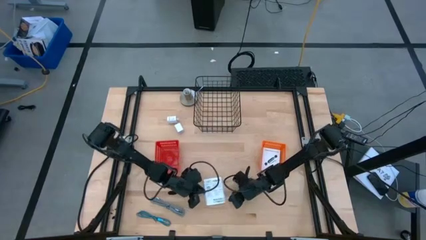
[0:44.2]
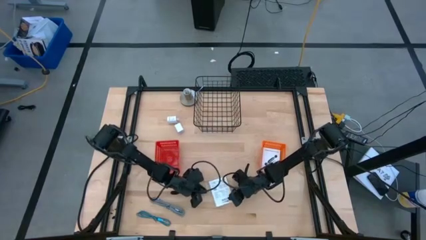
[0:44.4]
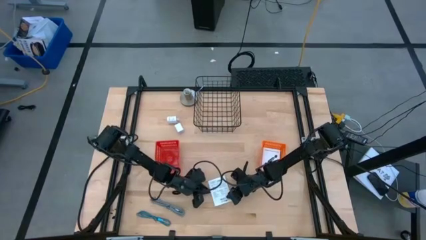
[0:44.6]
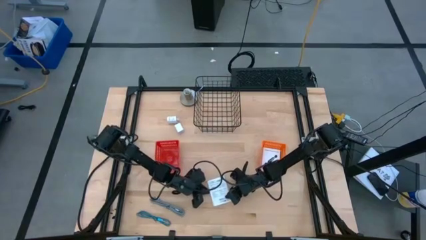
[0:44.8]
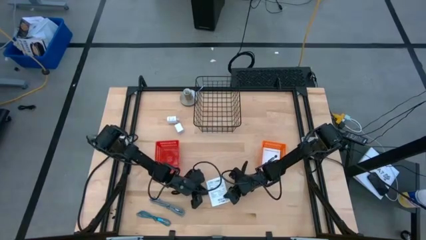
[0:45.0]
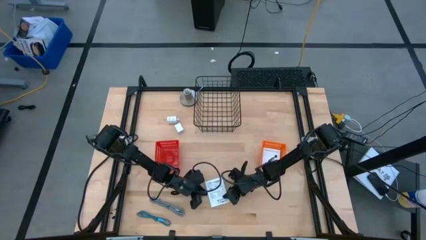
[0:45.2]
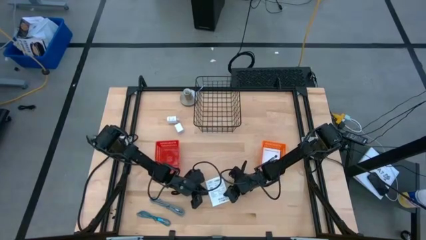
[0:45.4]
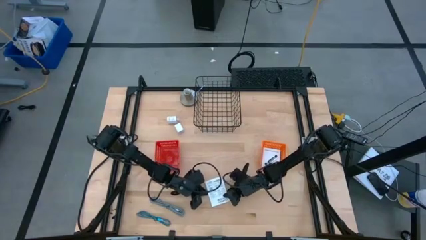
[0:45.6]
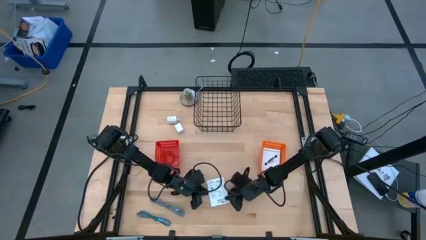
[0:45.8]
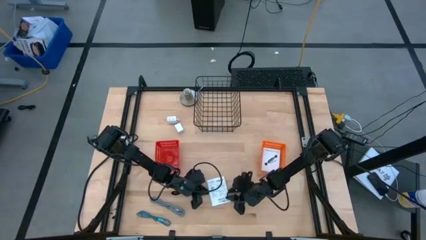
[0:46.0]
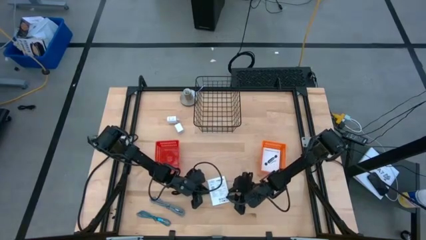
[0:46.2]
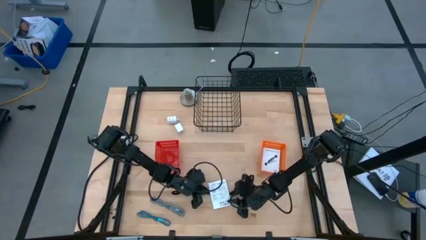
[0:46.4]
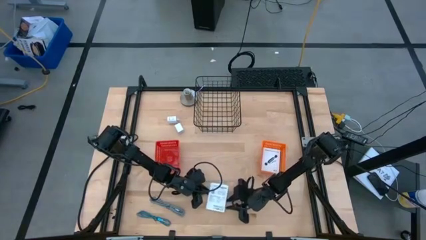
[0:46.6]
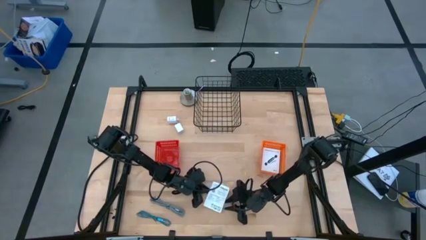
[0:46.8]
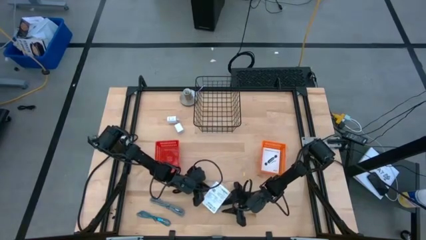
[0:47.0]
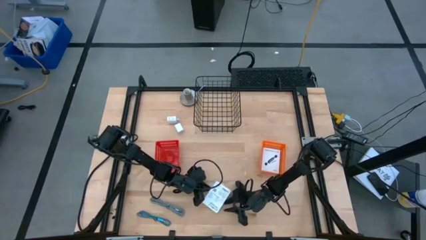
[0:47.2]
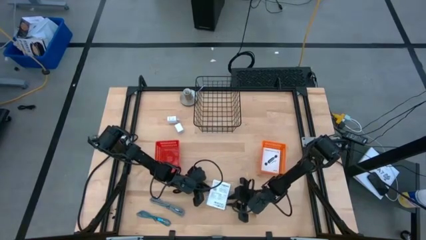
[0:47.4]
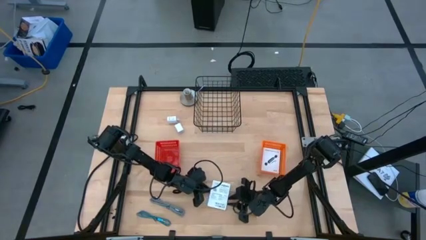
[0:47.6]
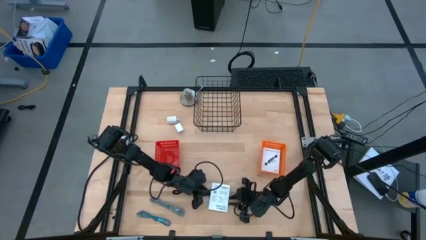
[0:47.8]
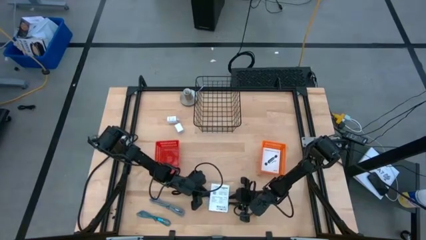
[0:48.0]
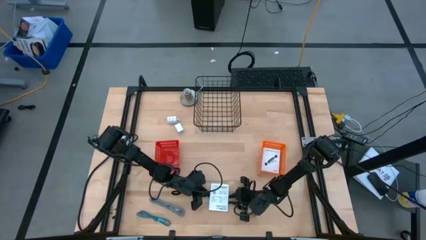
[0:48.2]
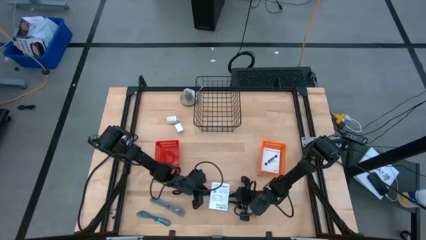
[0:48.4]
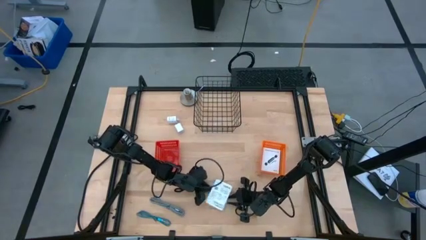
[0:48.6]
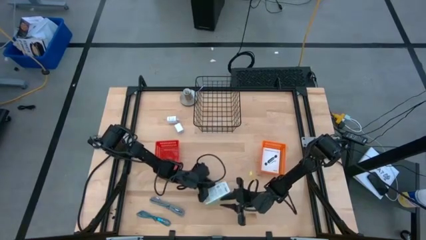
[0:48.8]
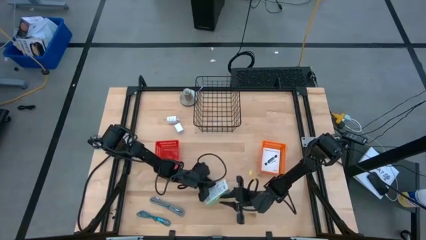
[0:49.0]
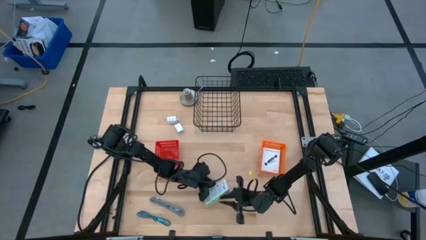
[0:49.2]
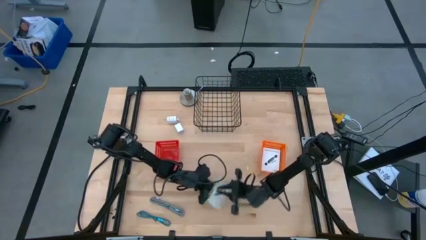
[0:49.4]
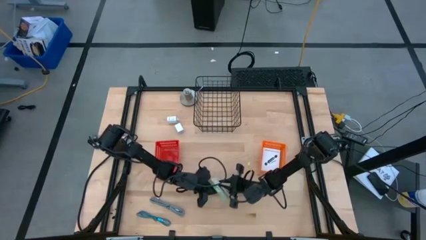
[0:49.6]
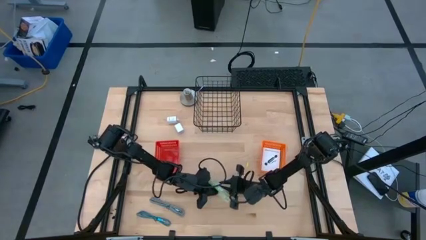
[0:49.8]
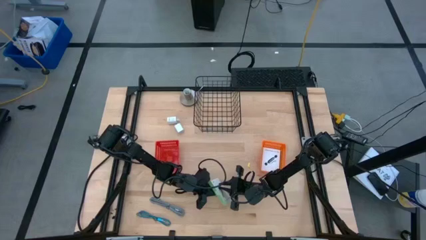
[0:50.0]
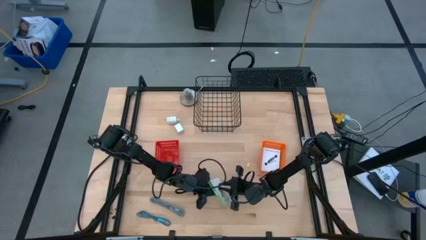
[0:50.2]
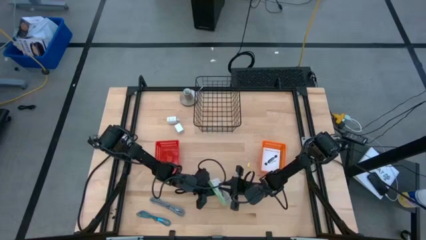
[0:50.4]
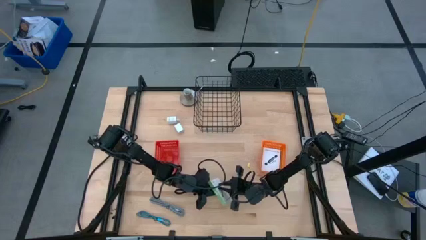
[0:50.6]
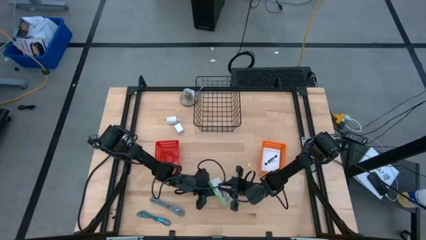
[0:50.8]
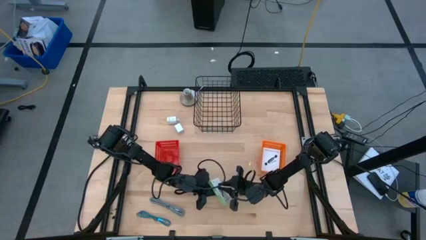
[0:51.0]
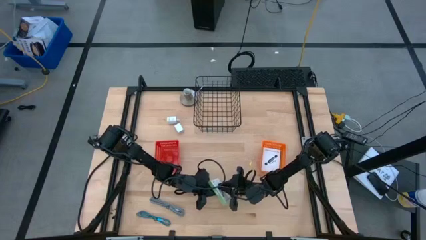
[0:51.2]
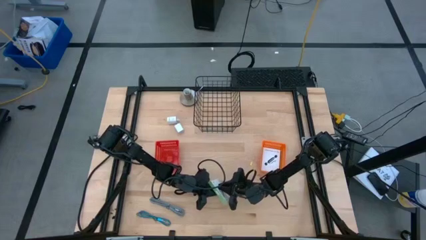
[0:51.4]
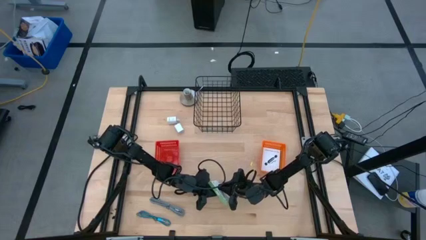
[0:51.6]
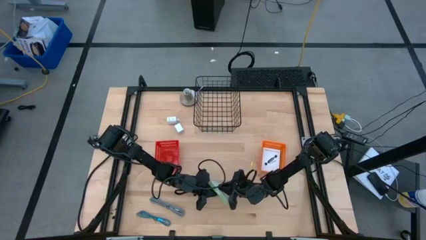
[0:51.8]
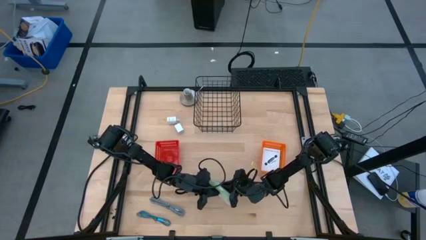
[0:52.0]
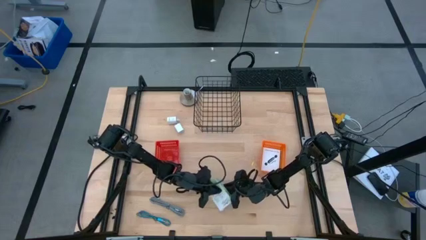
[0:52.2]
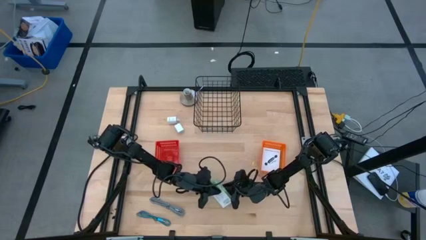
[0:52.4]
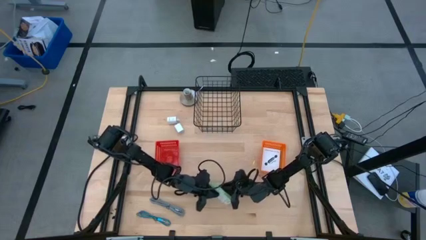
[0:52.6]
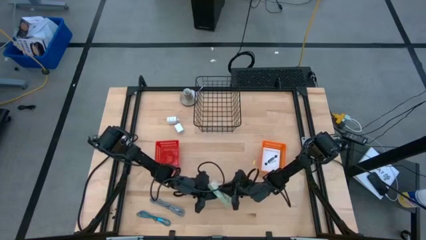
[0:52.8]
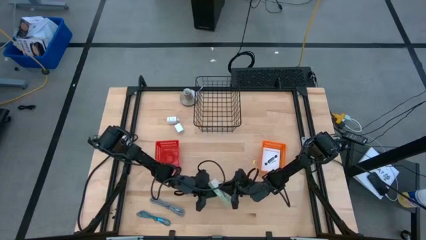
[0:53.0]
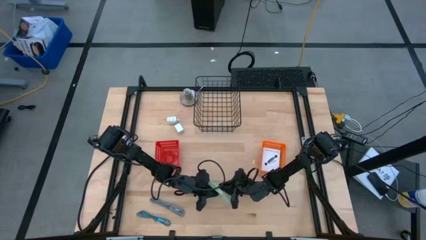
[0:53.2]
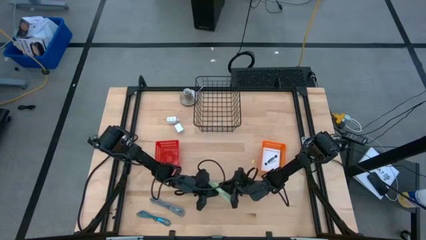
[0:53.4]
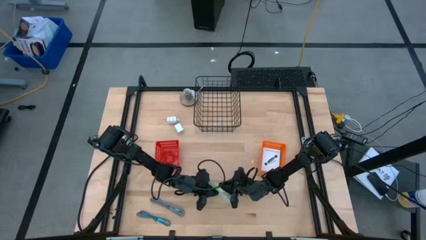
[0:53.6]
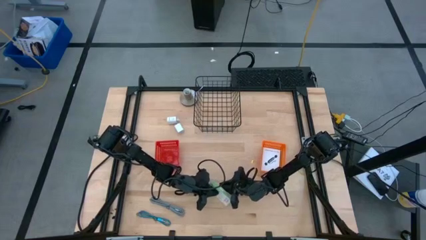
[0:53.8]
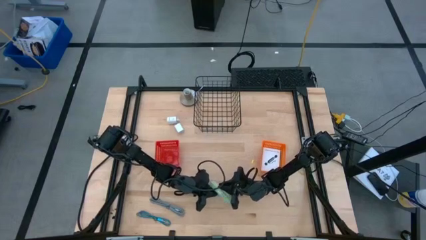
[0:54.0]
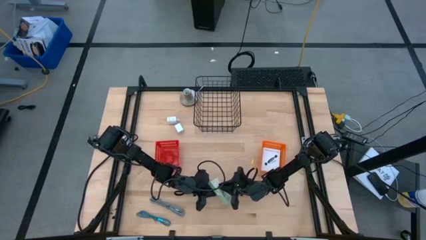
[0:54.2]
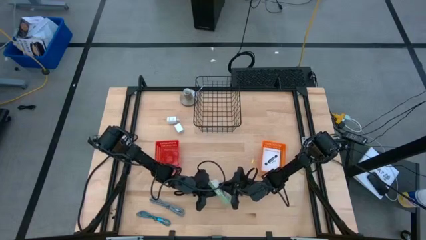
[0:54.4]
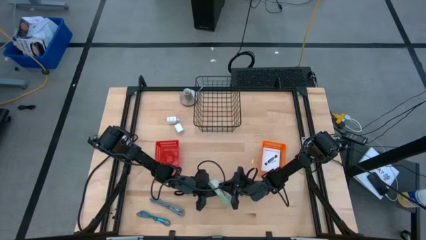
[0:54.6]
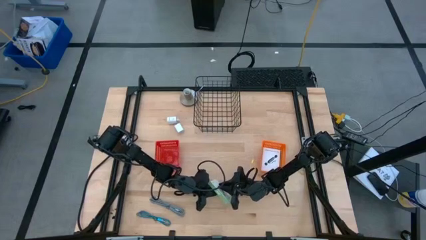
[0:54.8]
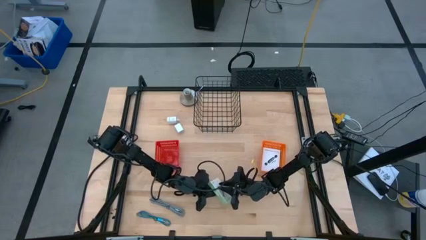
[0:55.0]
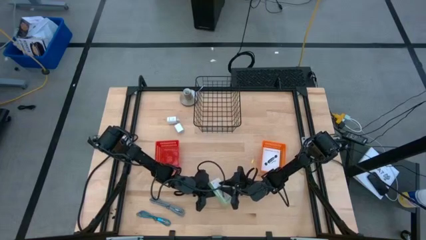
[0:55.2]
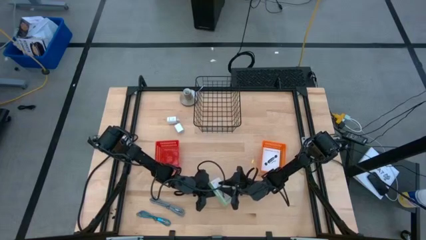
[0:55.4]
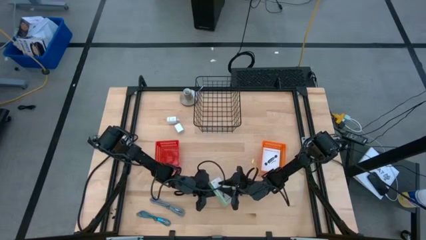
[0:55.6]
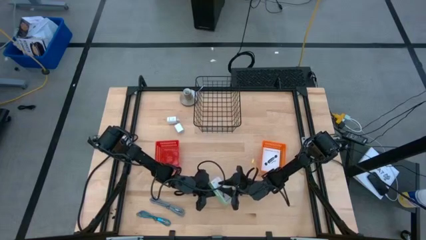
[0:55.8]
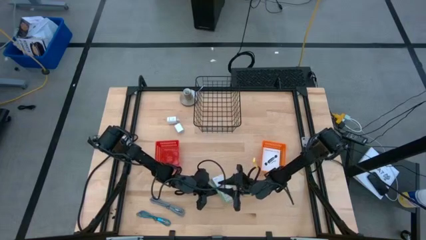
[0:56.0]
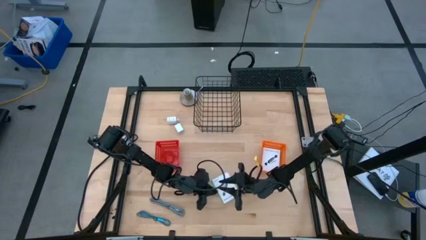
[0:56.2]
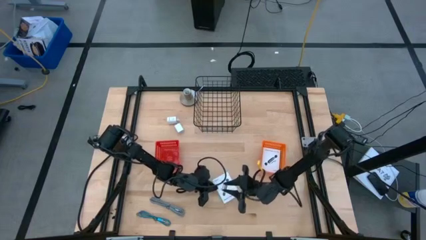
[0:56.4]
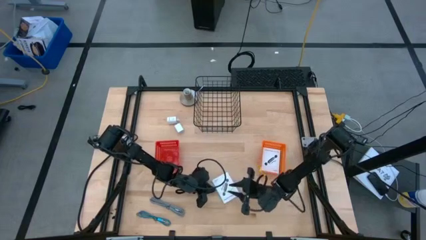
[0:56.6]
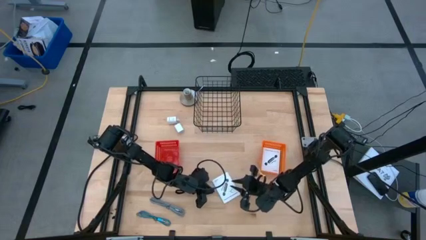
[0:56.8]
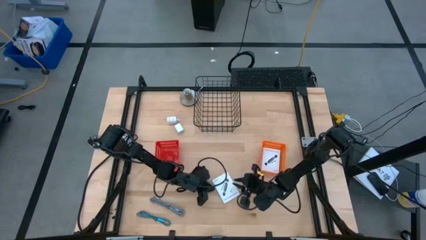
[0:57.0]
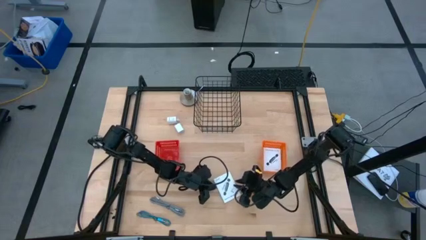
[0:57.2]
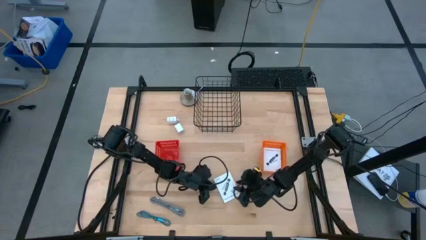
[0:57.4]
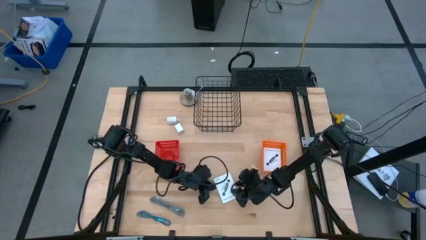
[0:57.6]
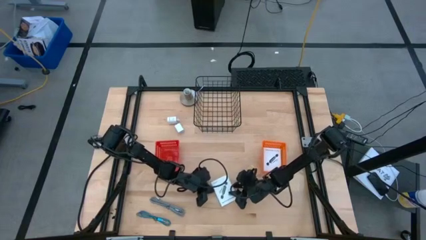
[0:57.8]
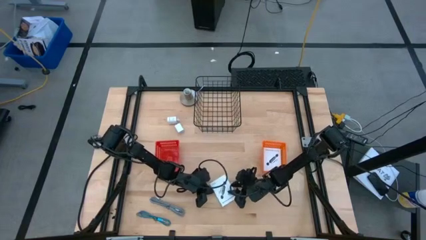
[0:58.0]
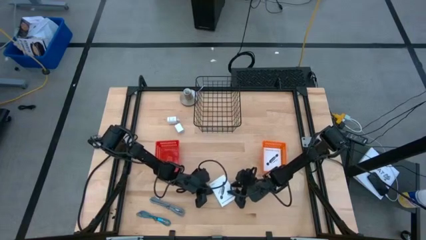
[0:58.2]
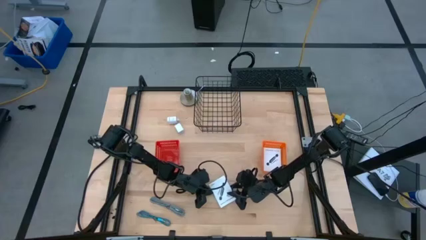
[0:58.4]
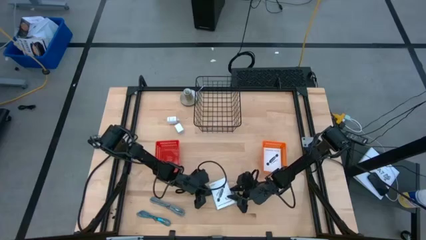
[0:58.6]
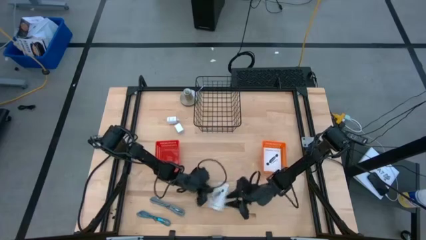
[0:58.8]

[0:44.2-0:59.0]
Task: Pick and place items into bin
Put the card reader box into the orange bin

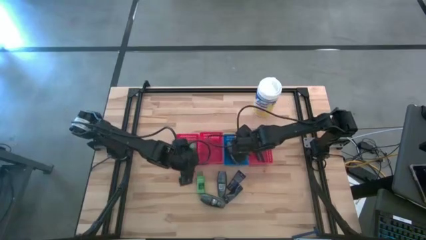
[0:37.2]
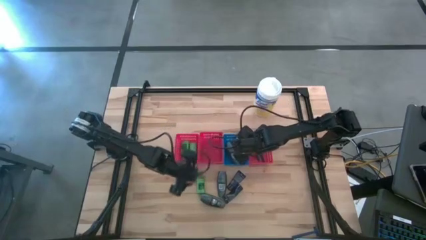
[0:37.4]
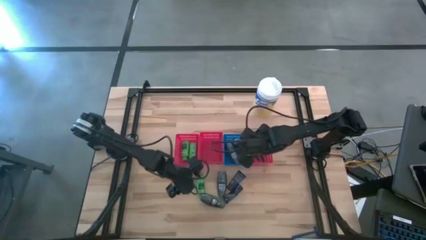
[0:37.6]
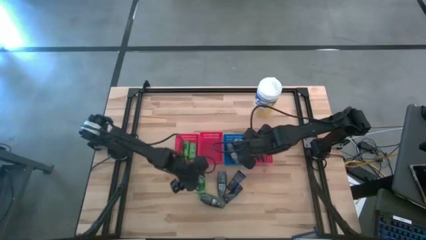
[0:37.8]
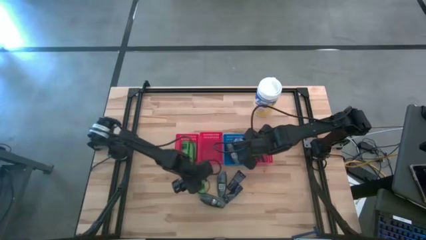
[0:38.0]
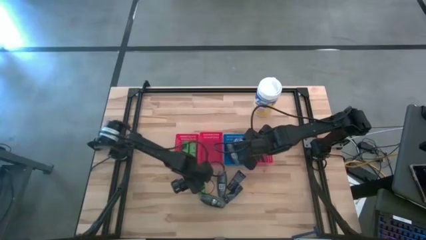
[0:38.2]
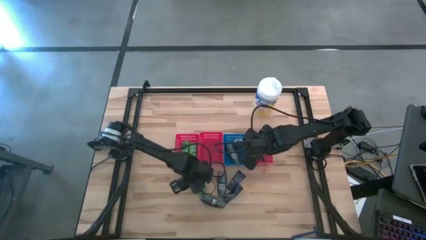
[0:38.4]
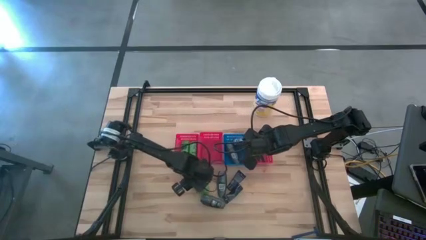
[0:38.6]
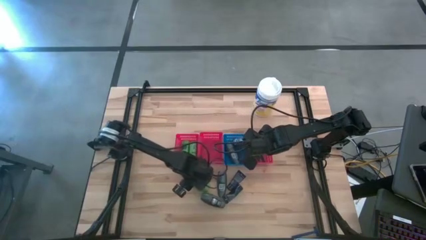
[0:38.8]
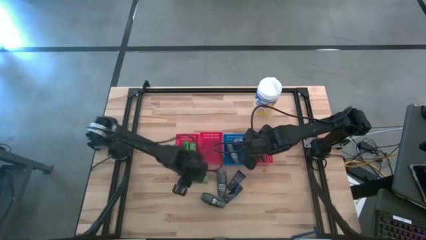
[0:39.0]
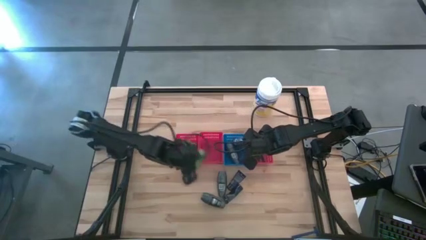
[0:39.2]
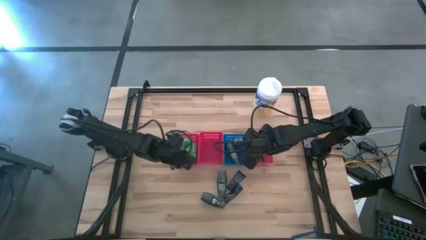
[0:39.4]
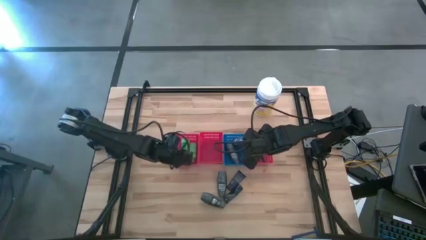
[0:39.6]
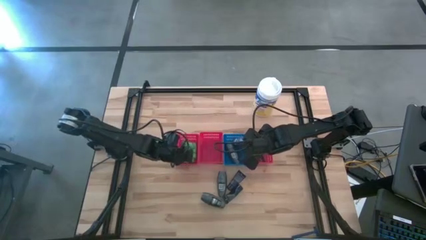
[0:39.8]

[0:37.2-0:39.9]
Task: Pick & Place Travel size toiletries
Put the shampoo into the left red bin
